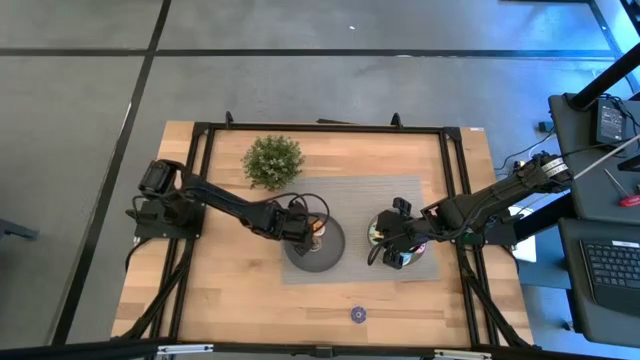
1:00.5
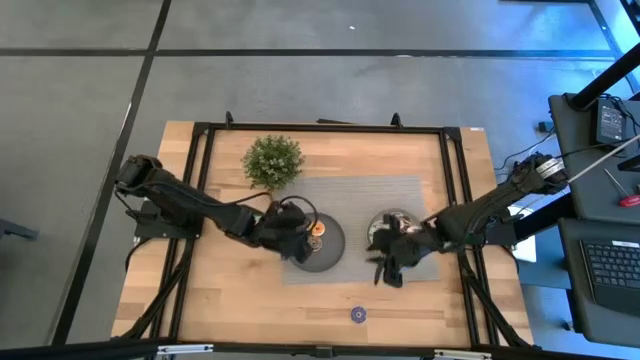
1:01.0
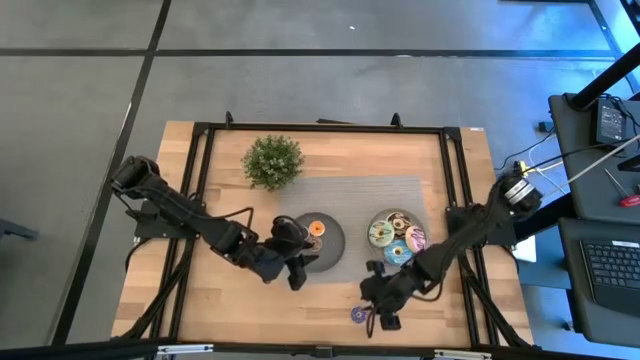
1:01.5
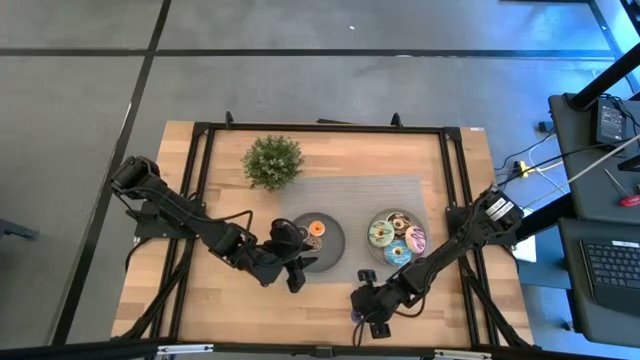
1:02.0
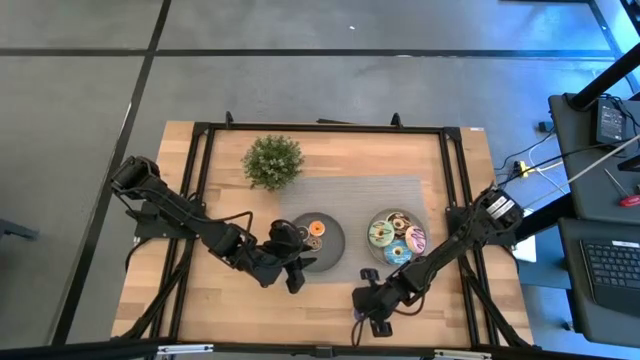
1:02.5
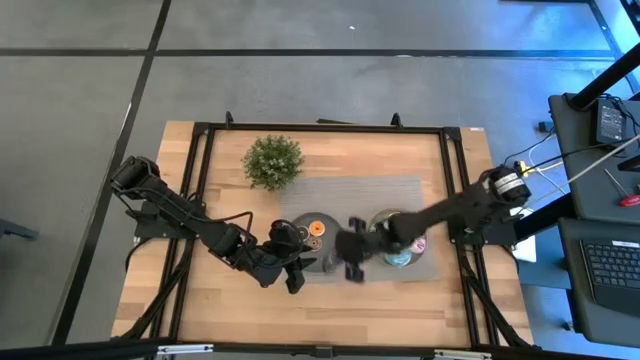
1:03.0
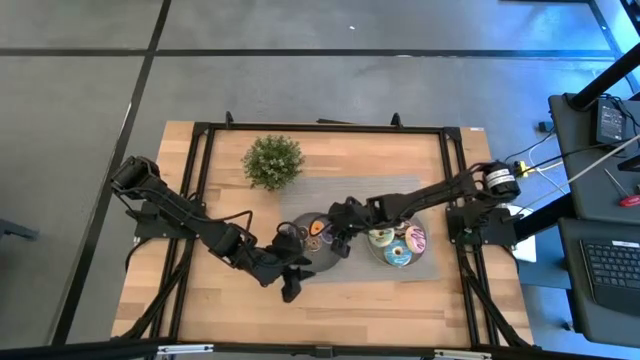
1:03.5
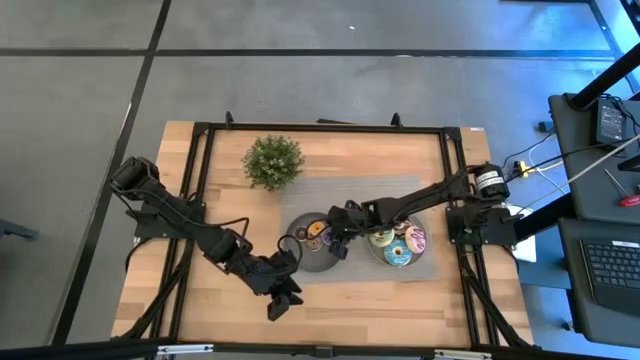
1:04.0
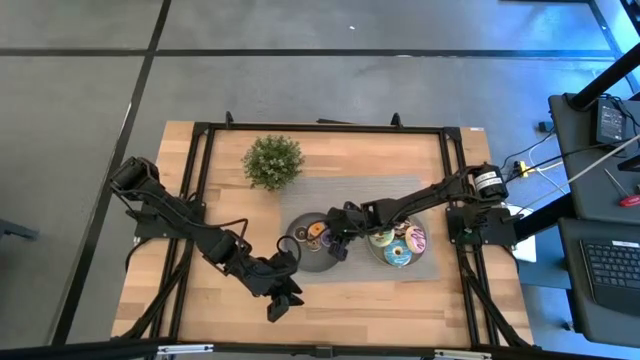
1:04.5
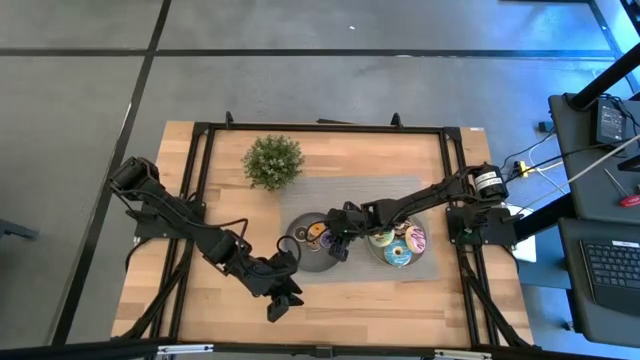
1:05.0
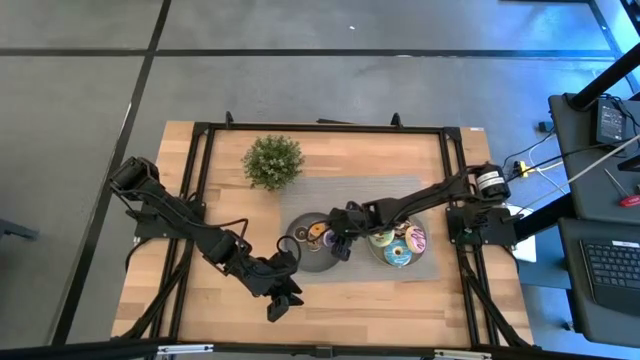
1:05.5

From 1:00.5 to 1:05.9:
Task: Pick & Place donuts
Put the small blue donut on the dark gray plate

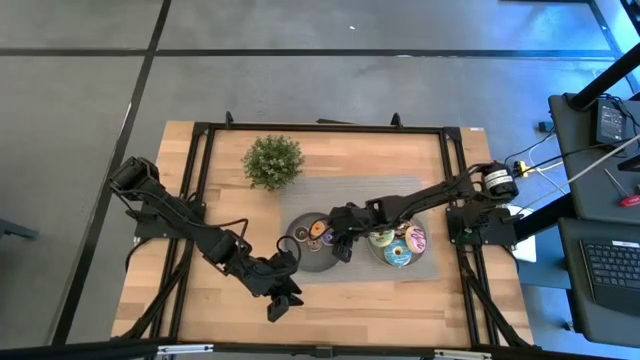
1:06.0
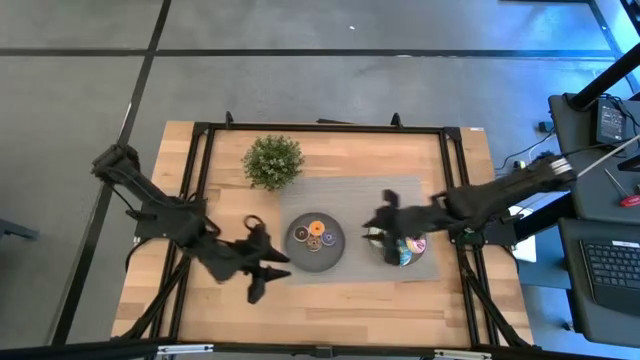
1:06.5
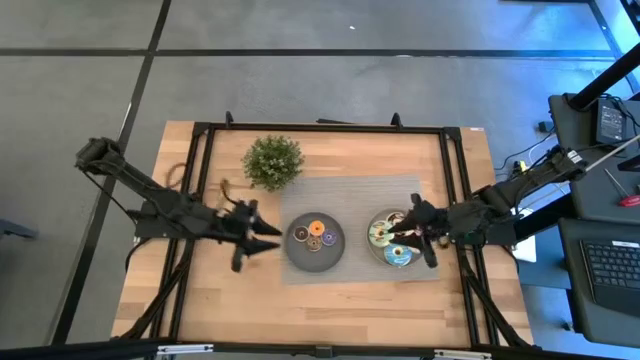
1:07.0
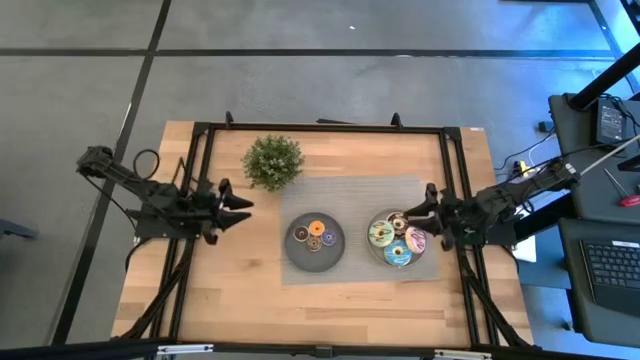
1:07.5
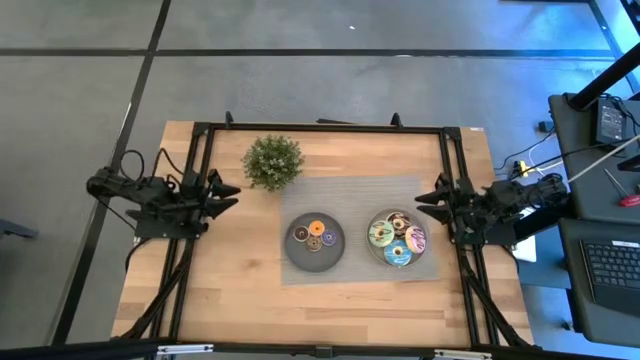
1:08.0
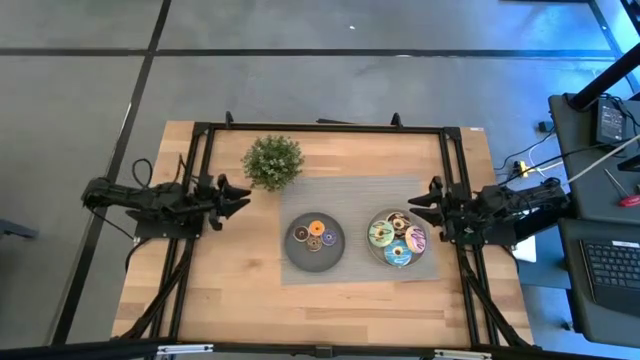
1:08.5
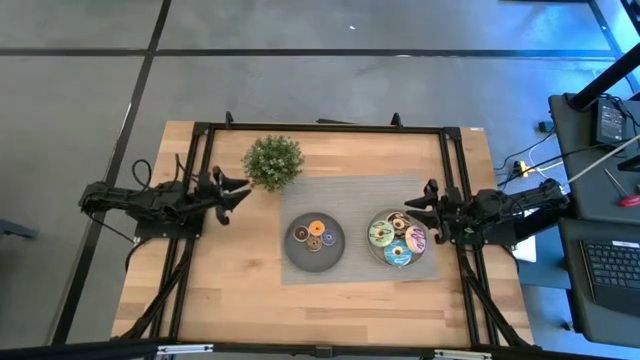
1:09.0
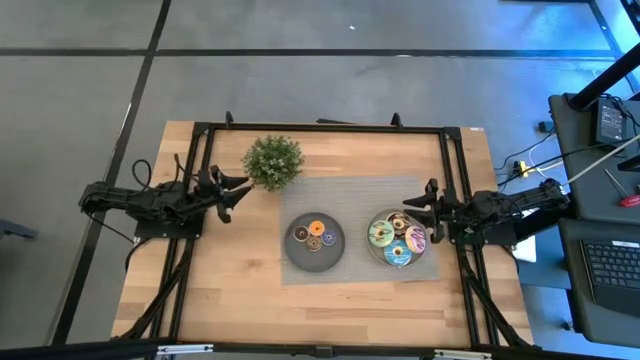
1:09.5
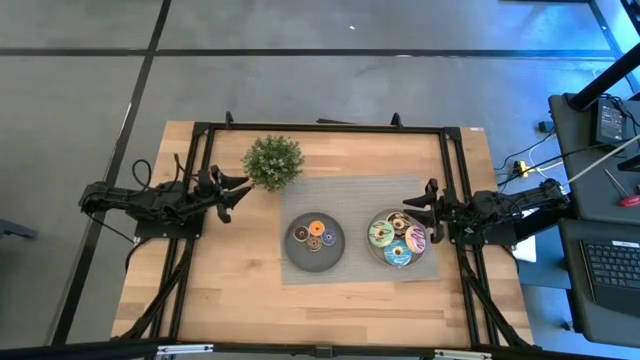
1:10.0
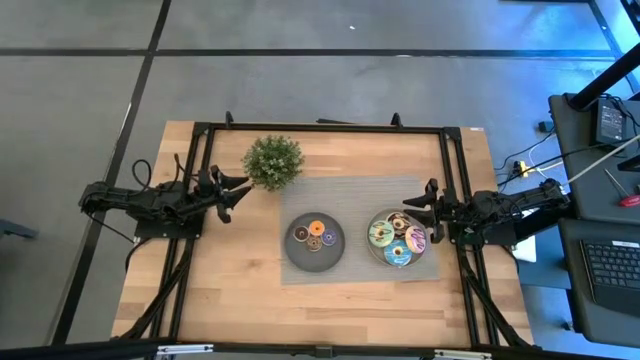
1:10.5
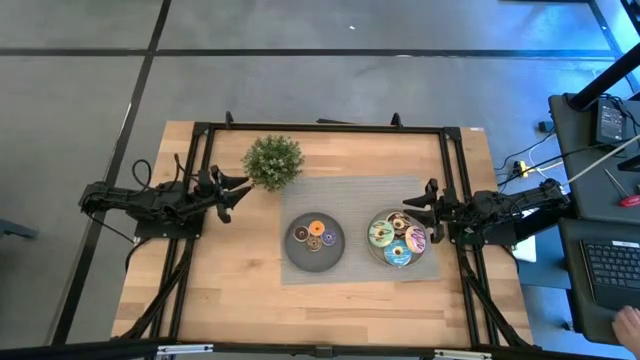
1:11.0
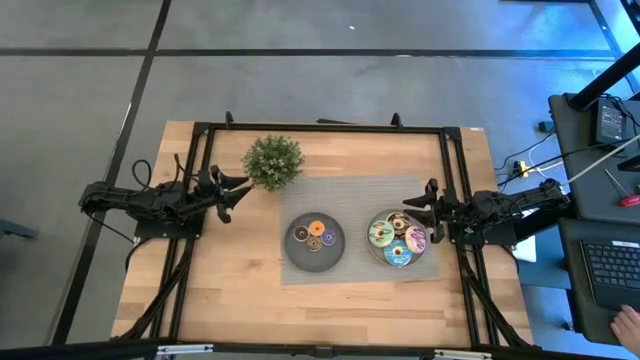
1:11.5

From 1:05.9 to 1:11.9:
Return to Home Position

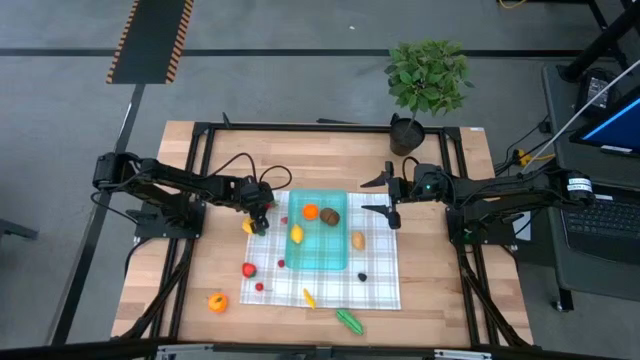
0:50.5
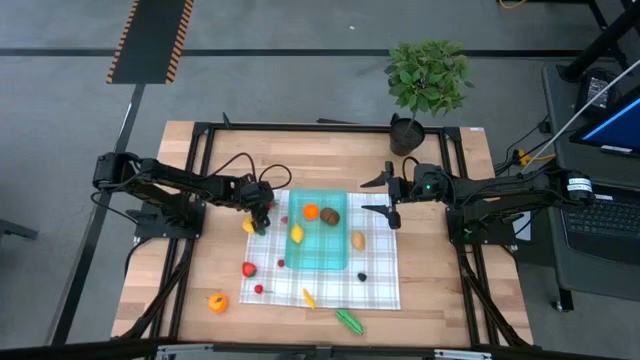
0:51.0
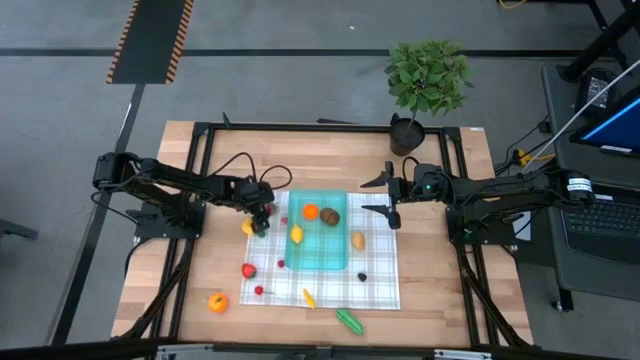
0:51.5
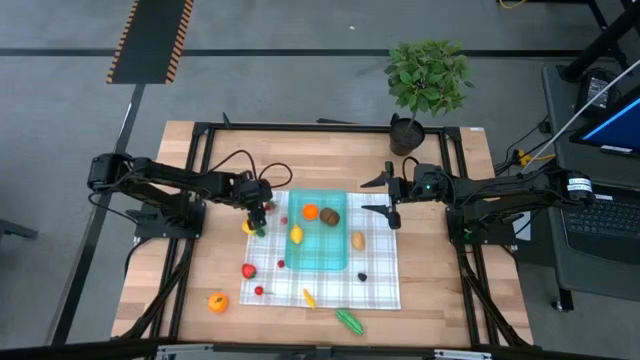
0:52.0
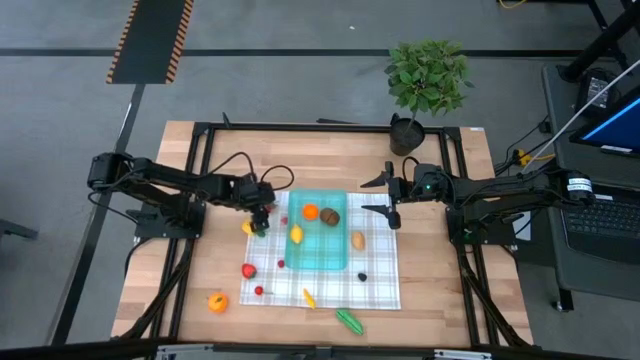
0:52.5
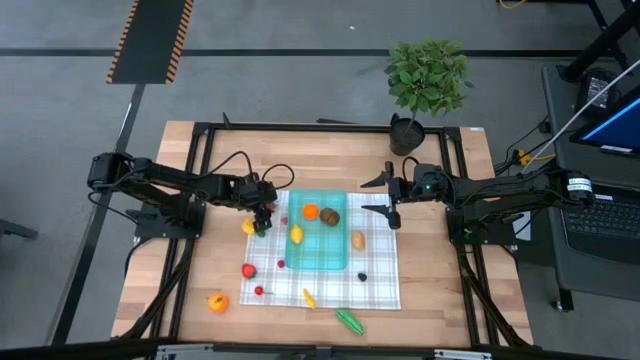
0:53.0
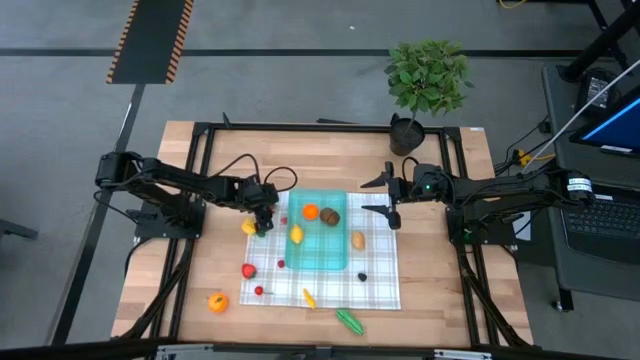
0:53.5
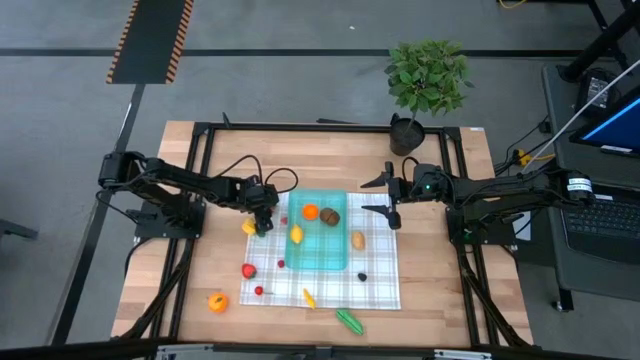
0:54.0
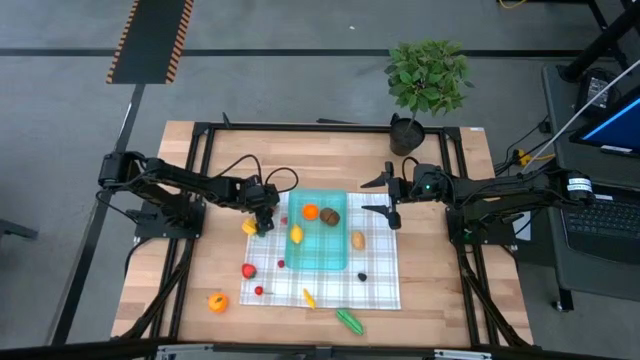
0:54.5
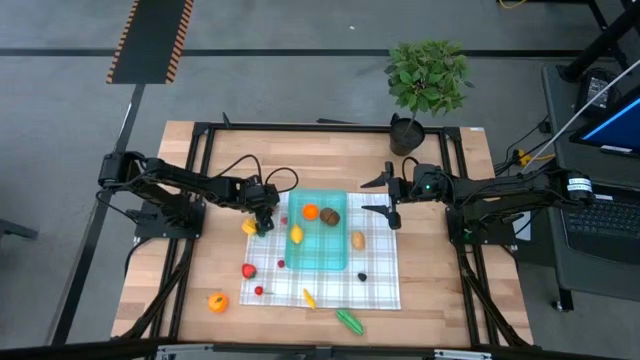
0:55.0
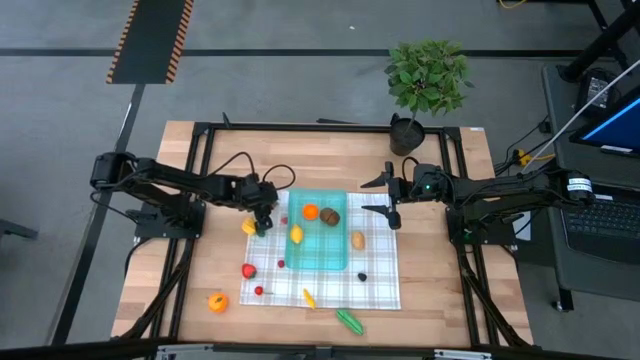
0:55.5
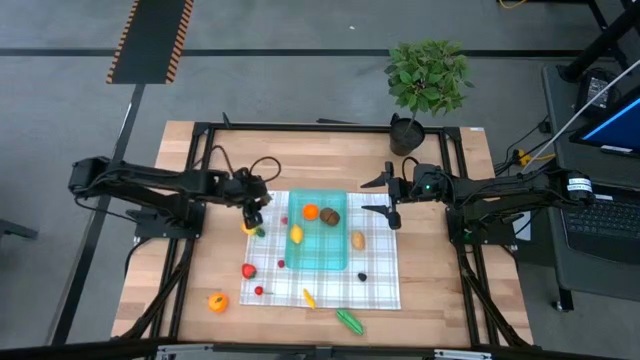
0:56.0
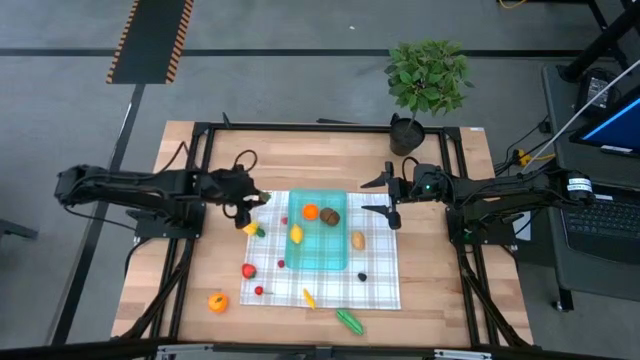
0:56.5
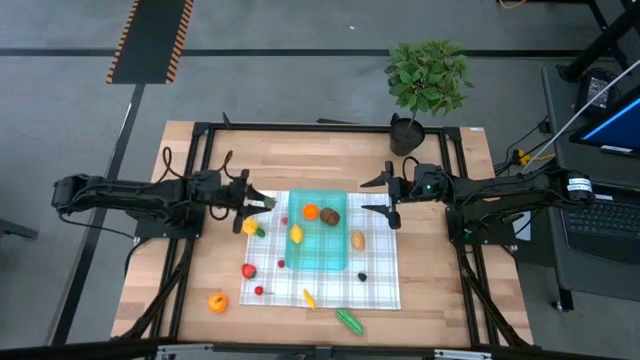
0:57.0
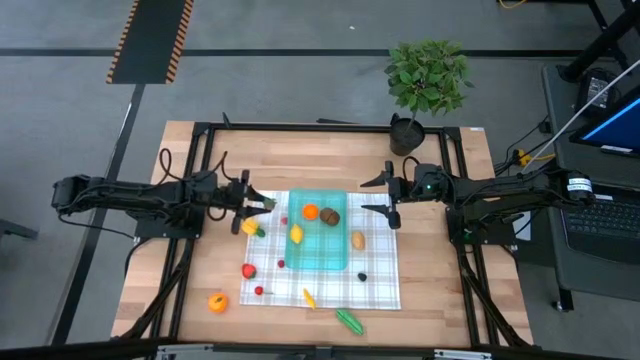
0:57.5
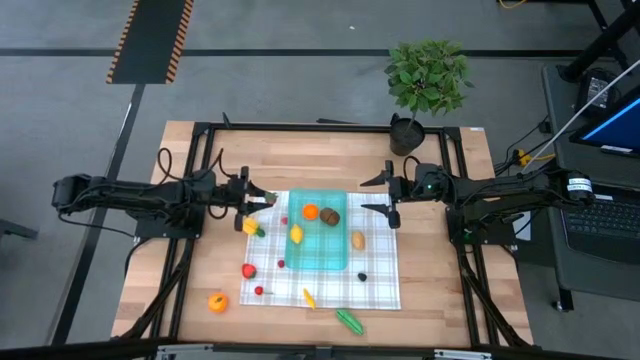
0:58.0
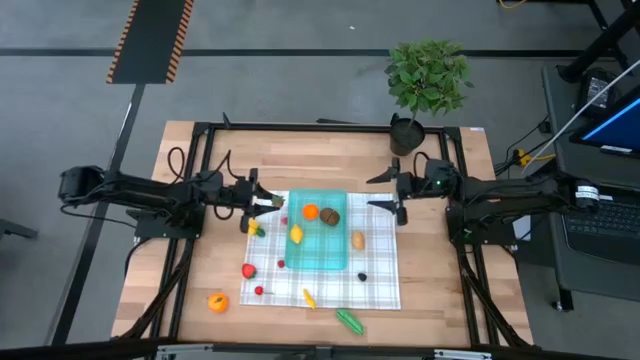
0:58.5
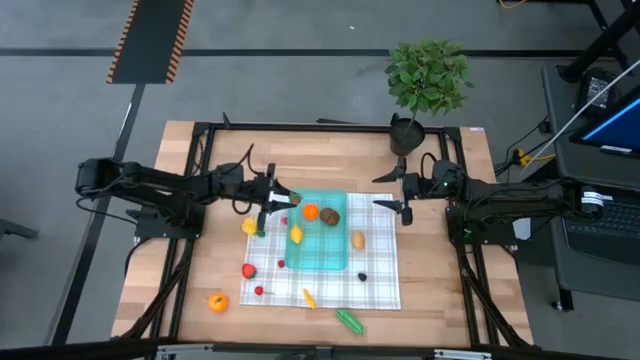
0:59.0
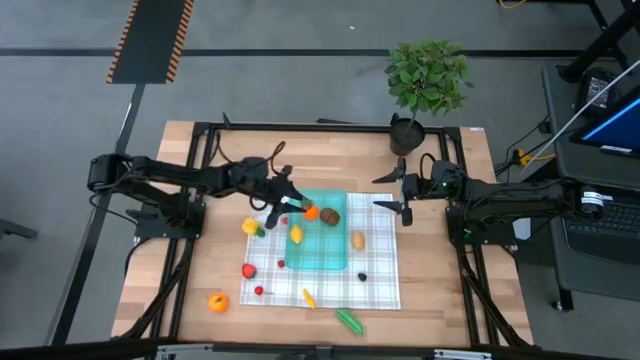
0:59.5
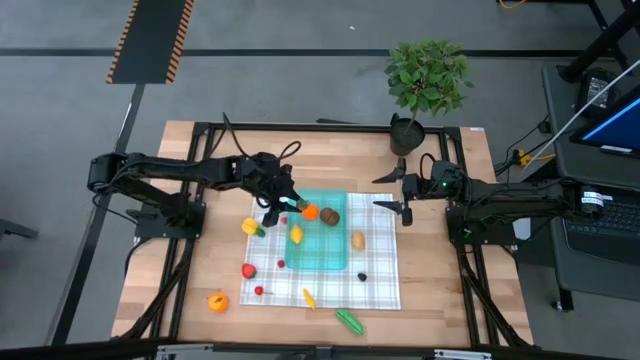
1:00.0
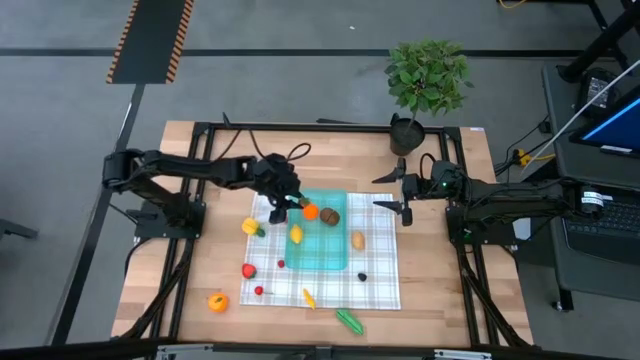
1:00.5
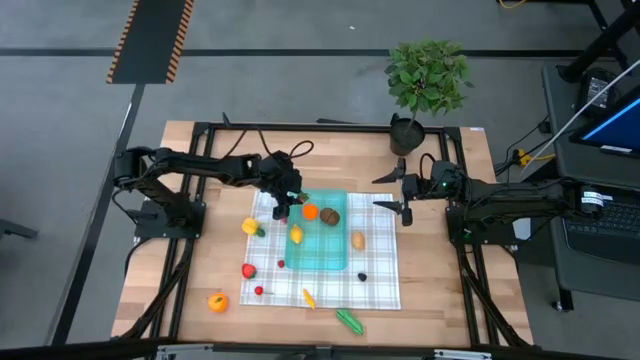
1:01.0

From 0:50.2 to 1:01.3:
Task: Pick and placing Produce into tupperware
Put the top red strawberry into the blue bin
